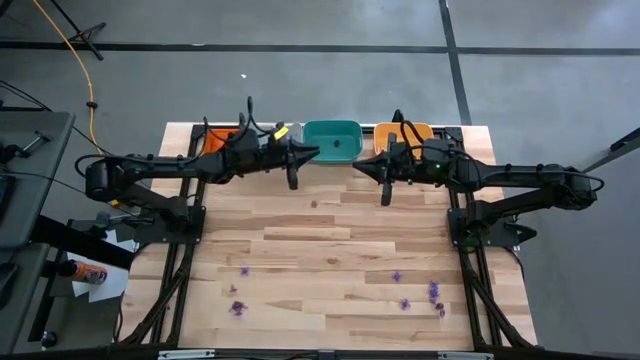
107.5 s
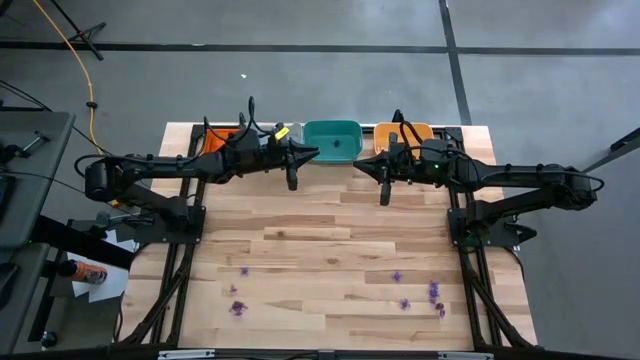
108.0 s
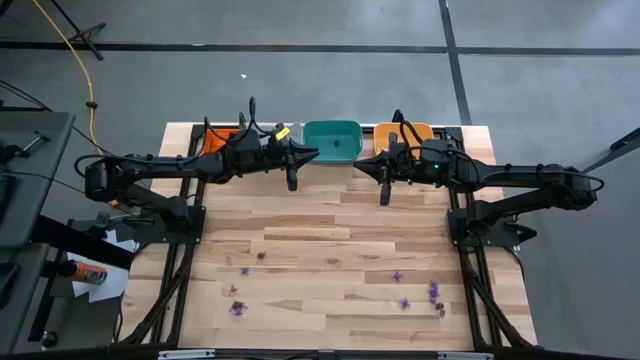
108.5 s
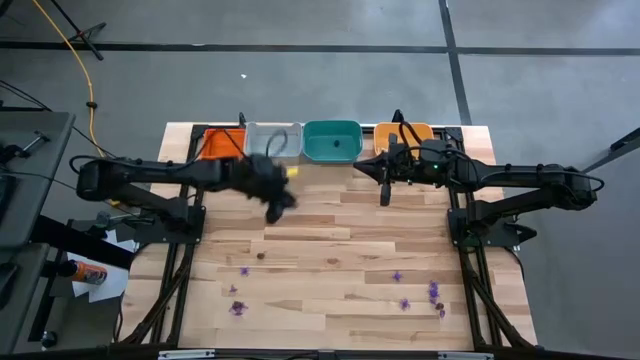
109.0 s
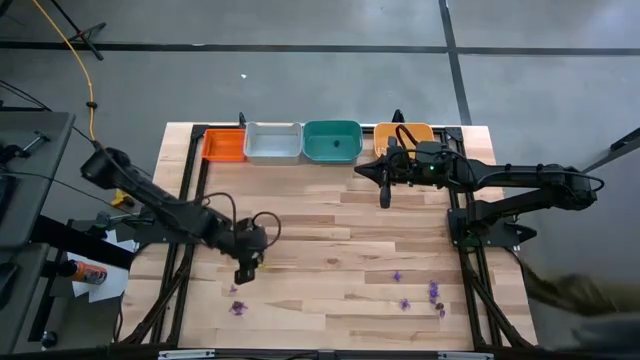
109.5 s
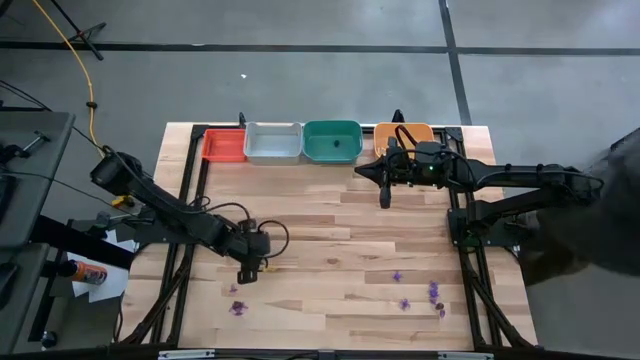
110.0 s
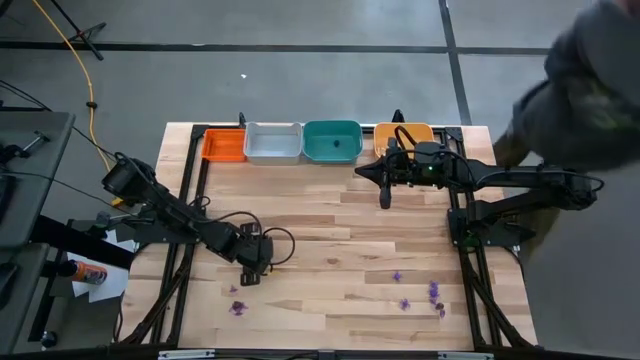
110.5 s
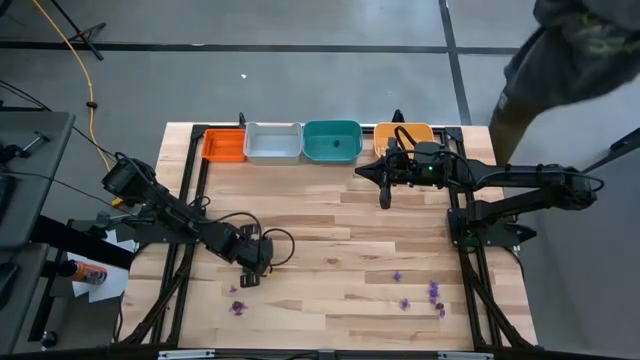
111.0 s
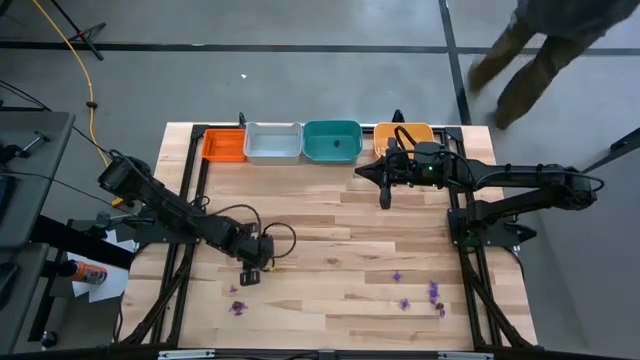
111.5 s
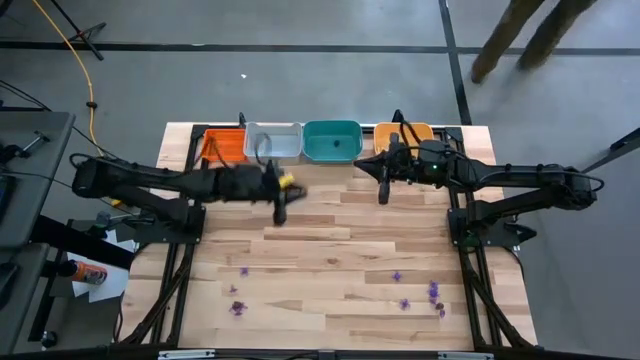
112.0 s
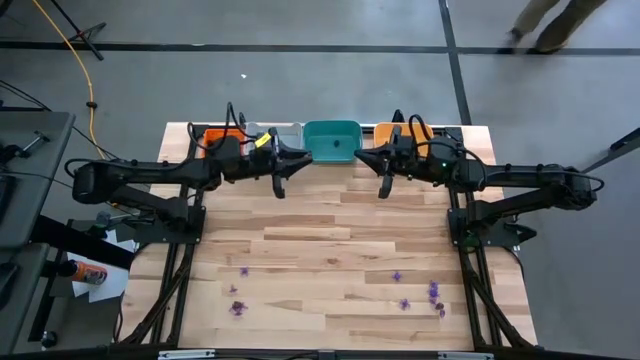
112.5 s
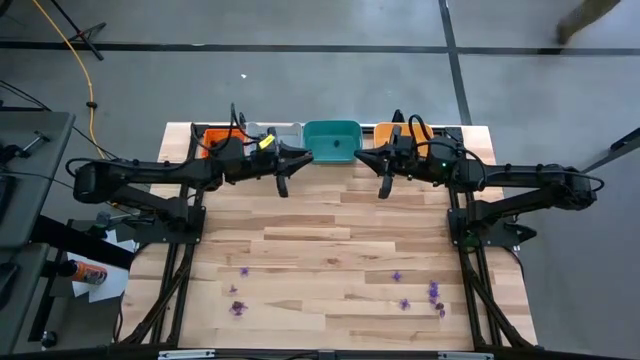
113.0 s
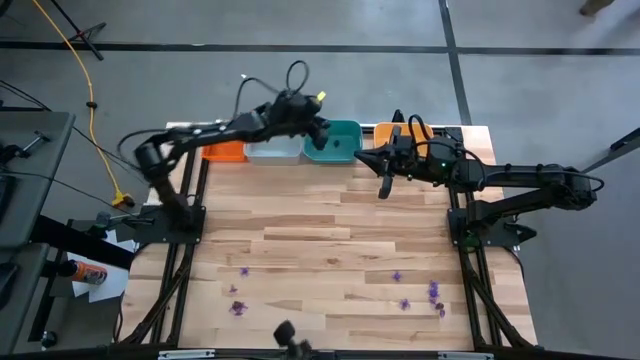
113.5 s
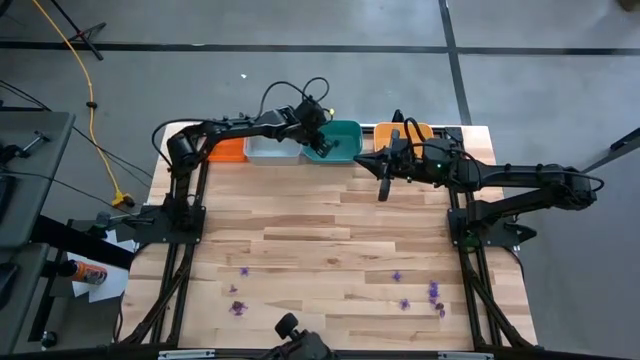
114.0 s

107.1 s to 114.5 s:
Task: Sort Halloween decoration
Put the black skull into the green bin

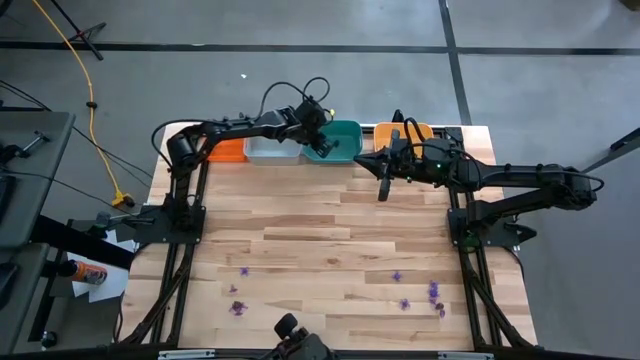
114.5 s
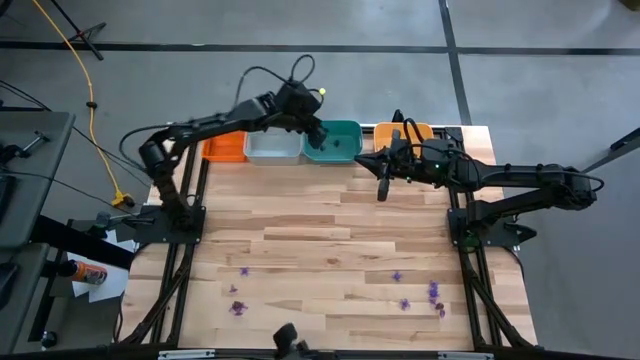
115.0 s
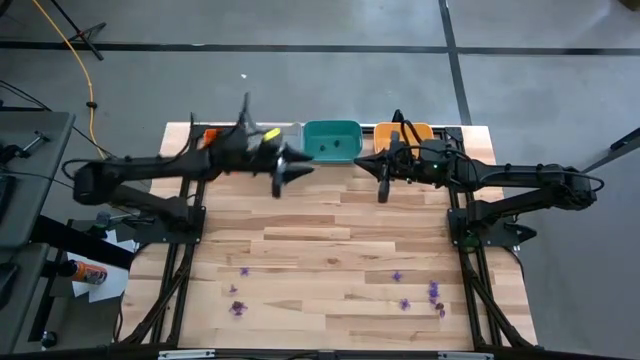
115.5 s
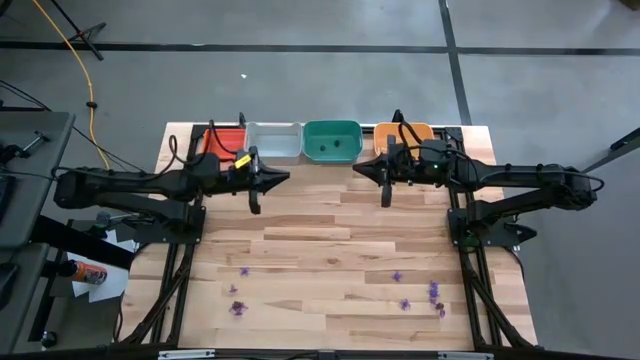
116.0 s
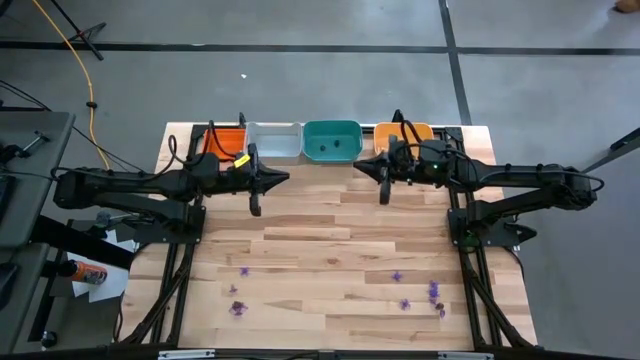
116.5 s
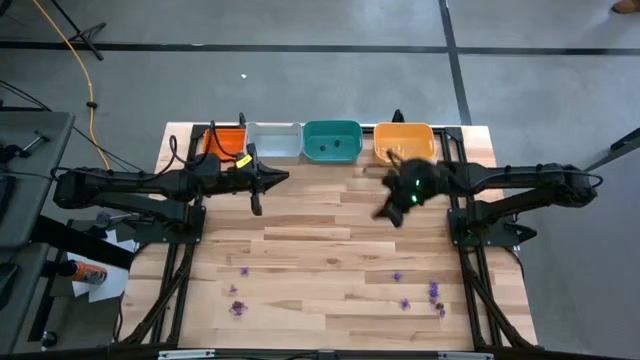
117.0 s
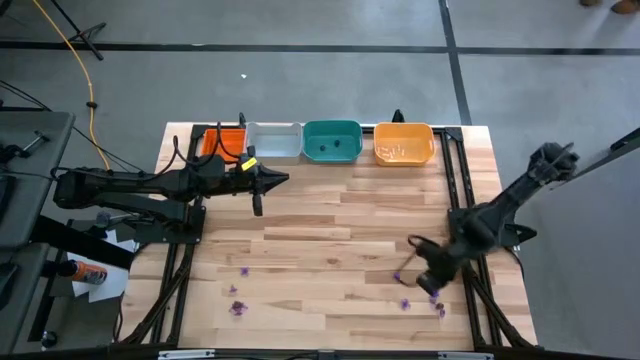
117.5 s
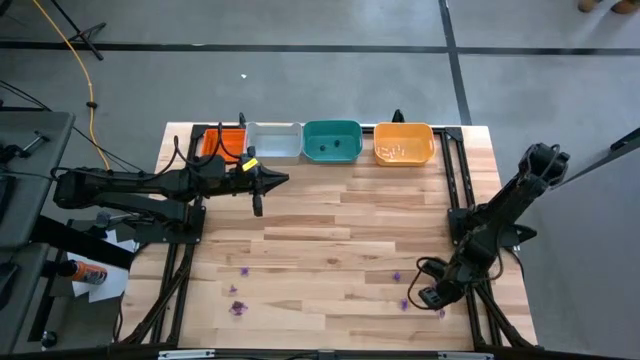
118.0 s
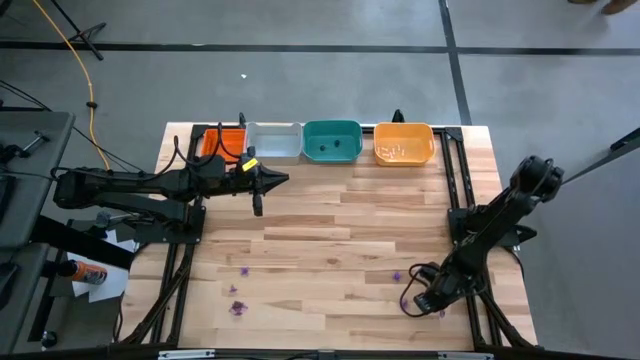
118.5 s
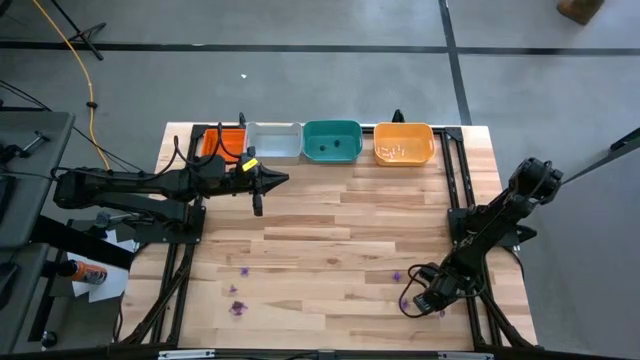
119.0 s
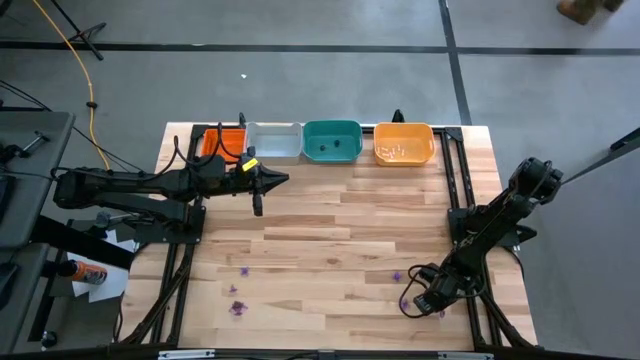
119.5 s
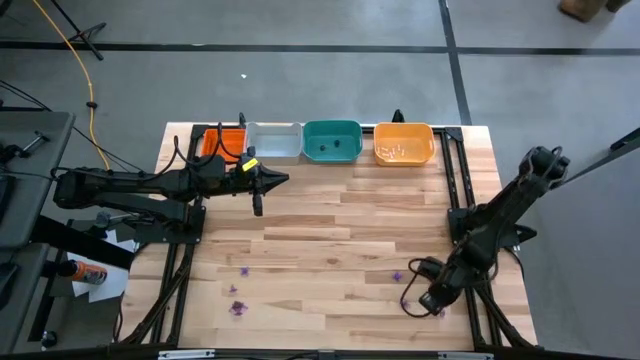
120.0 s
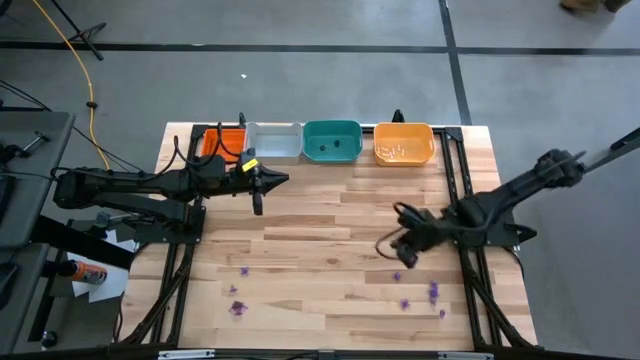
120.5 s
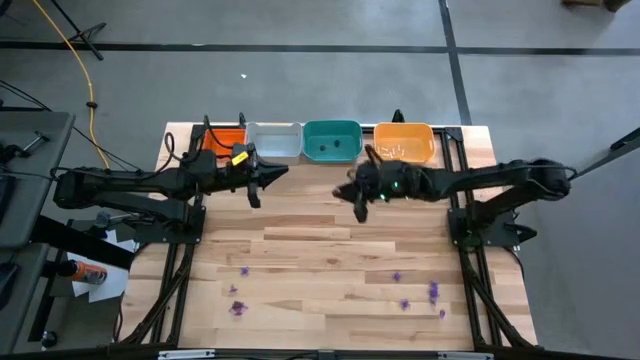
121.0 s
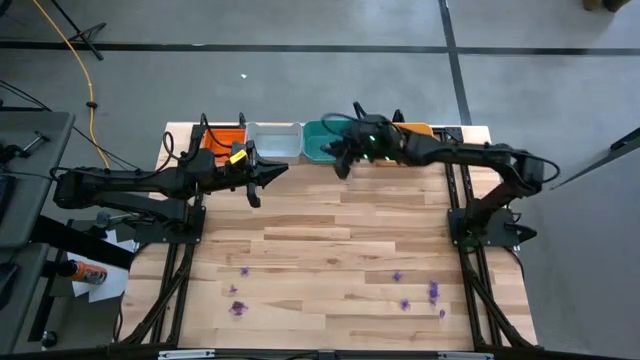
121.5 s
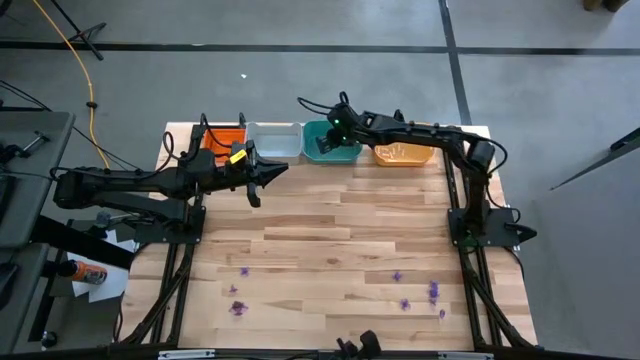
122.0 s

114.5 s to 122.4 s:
Put the black skull into the green bin

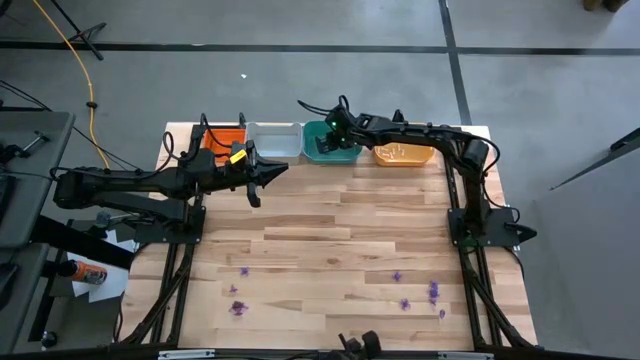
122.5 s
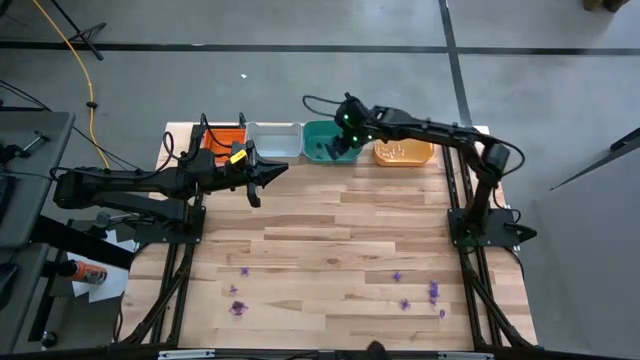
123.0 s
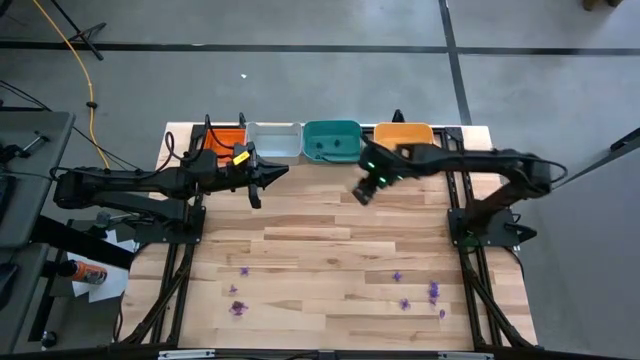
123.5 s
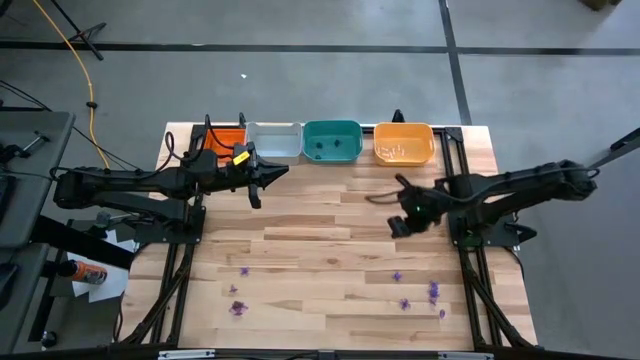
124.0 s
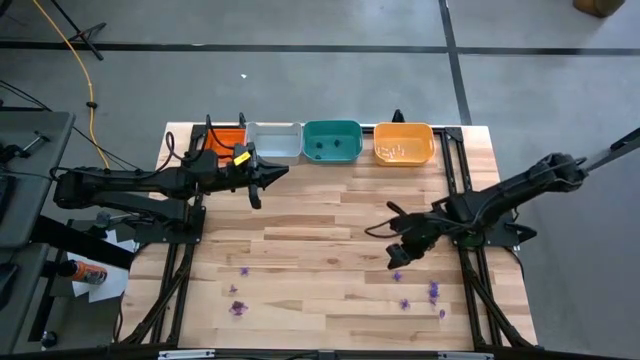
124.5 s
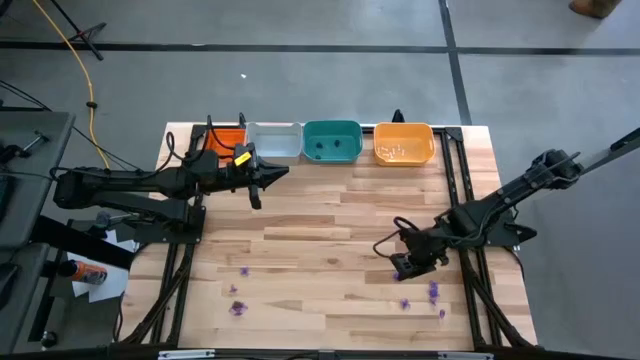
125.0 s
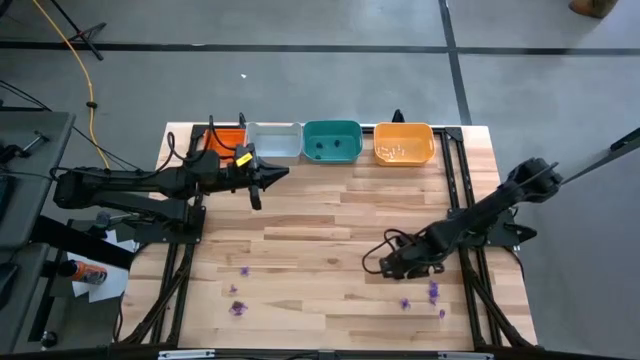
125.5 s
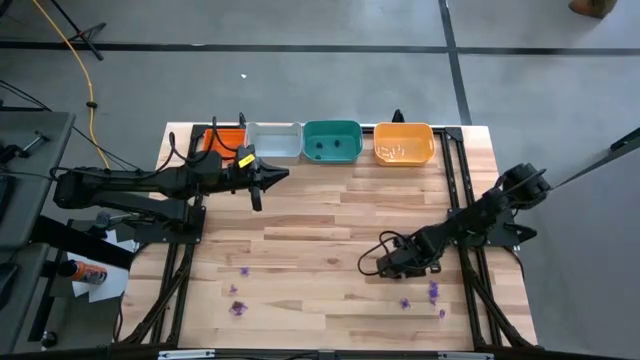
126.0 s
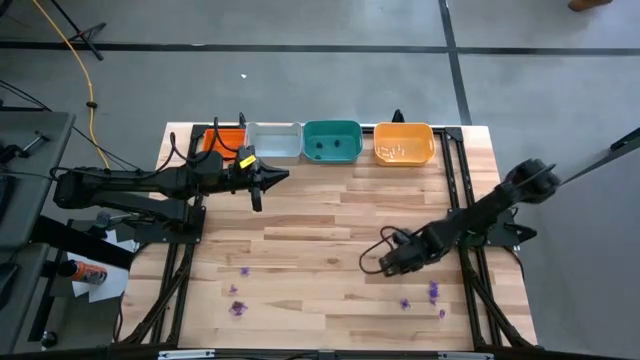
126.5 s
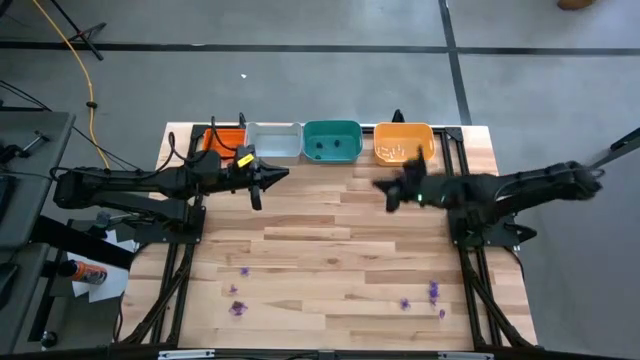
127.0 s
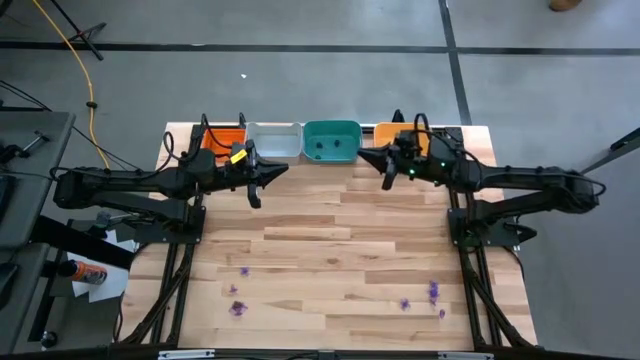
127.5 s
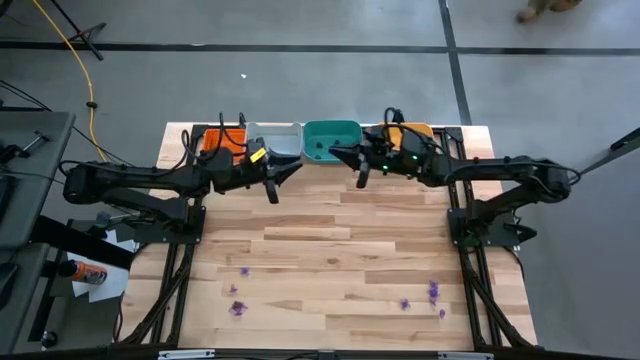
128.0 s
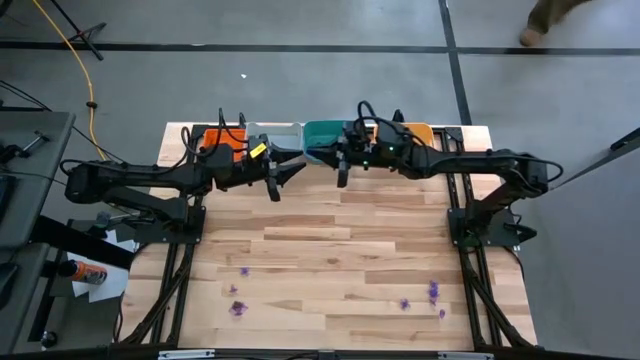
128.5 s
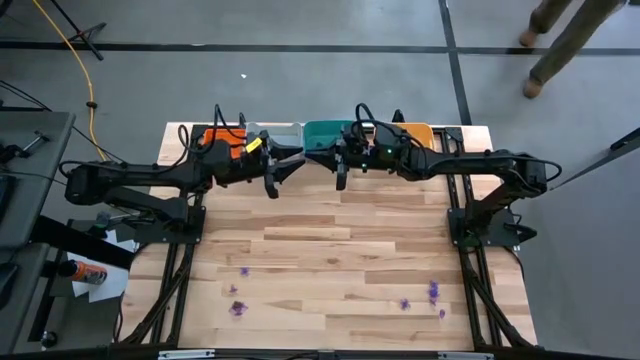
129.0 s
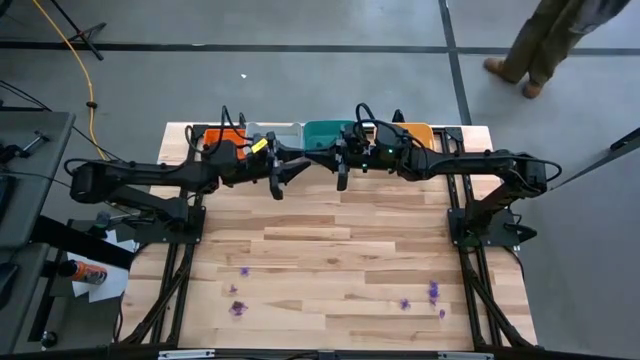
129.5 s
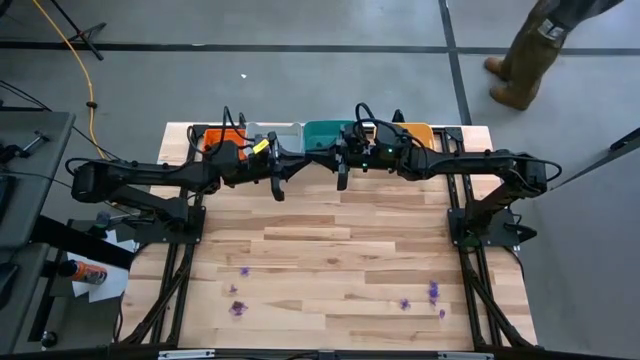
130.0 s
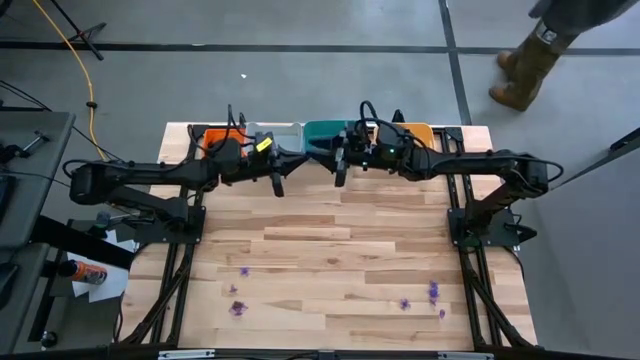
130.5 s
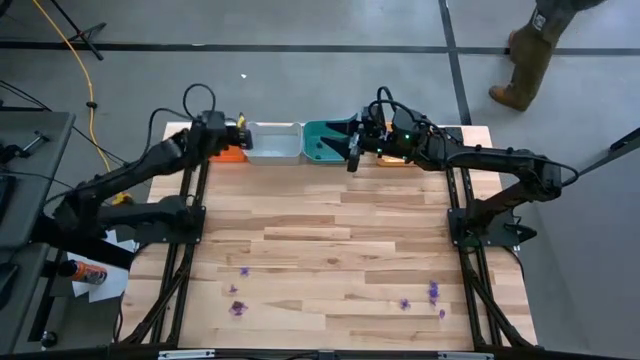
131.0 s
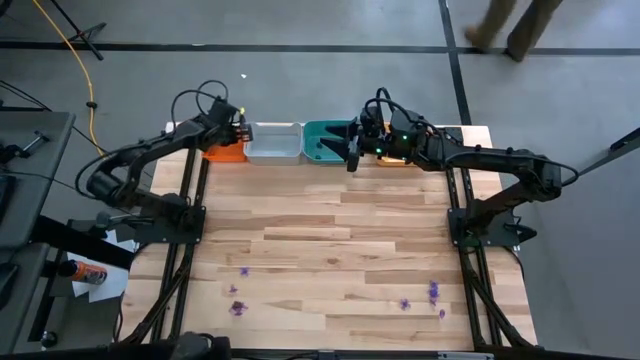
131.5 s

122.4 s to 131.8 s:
Put the violet spider into the orange bin
